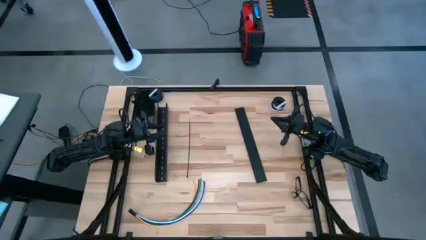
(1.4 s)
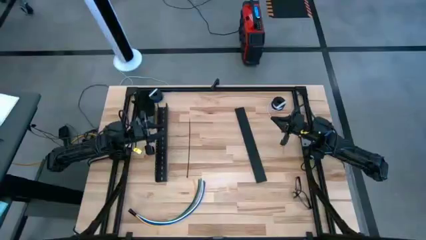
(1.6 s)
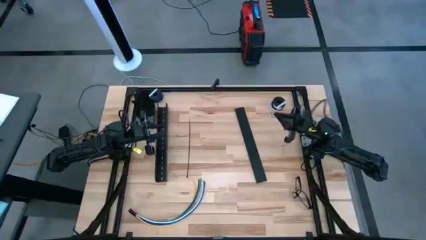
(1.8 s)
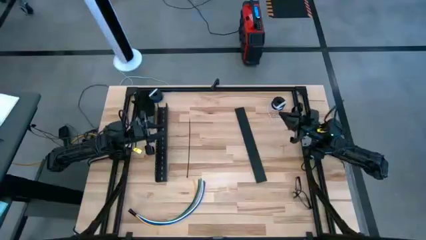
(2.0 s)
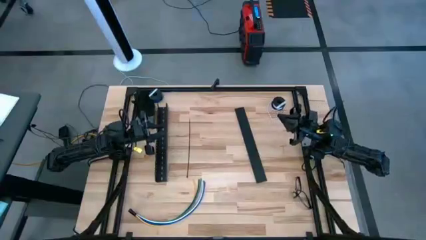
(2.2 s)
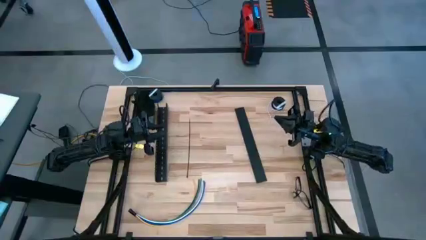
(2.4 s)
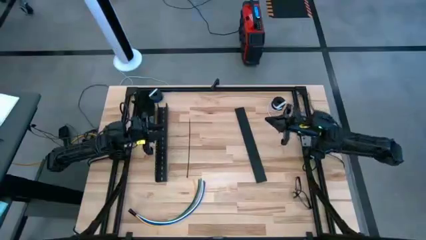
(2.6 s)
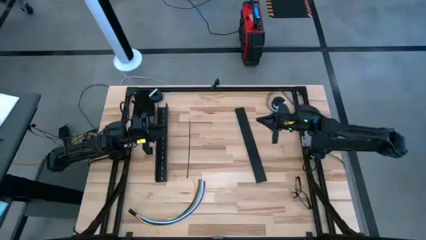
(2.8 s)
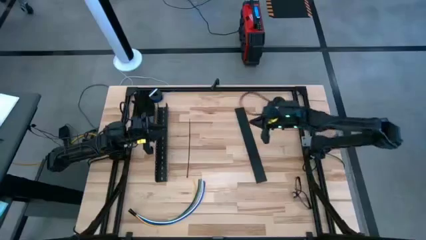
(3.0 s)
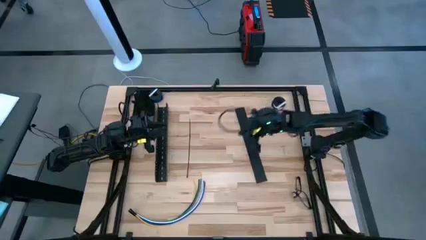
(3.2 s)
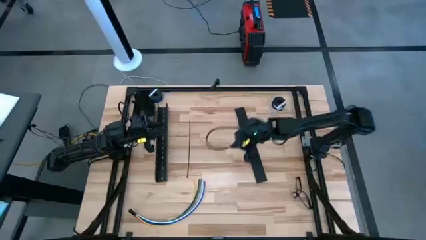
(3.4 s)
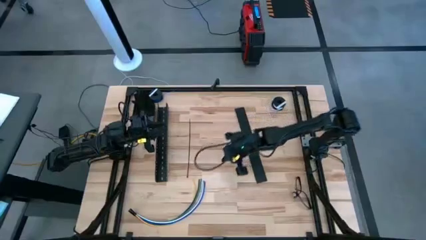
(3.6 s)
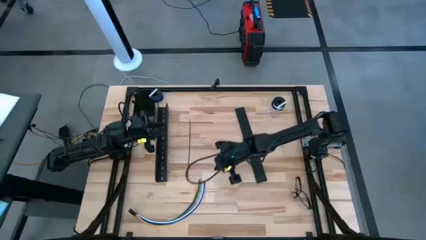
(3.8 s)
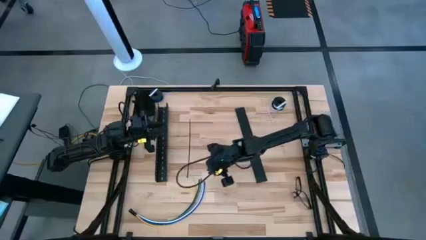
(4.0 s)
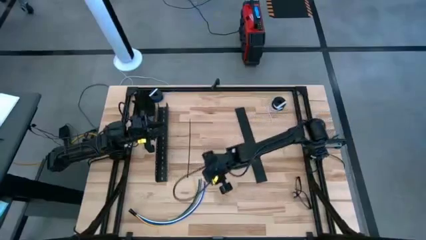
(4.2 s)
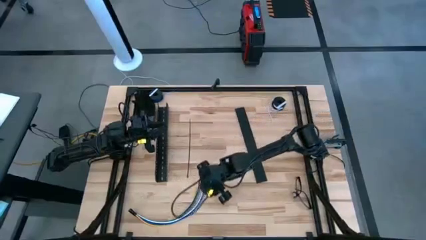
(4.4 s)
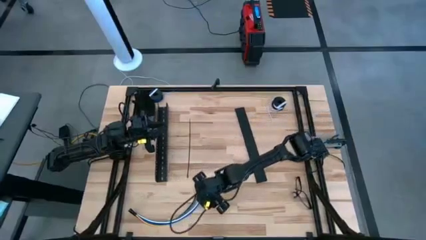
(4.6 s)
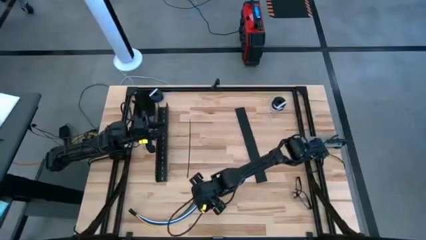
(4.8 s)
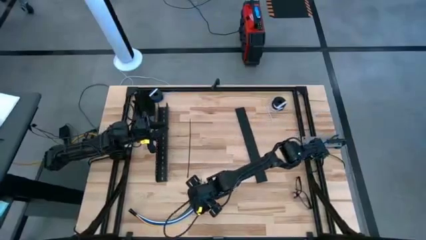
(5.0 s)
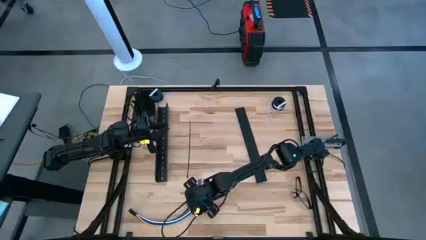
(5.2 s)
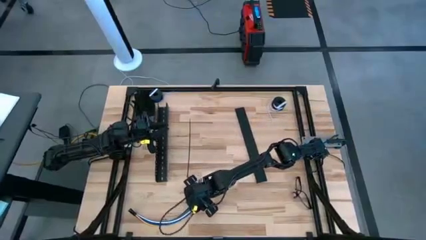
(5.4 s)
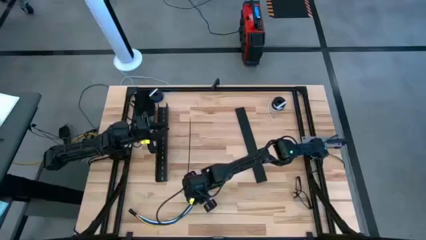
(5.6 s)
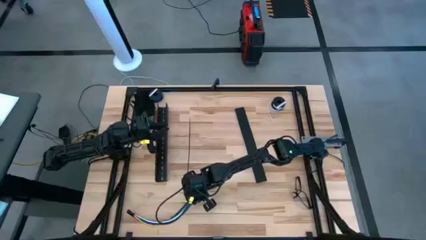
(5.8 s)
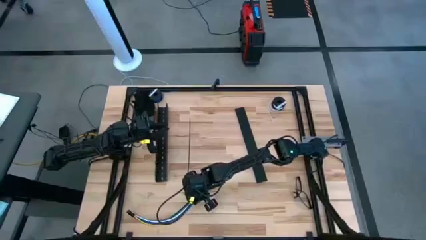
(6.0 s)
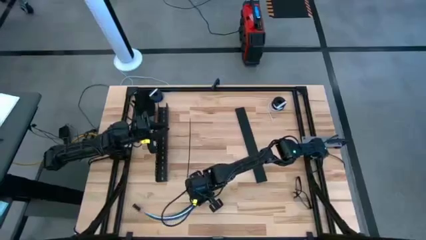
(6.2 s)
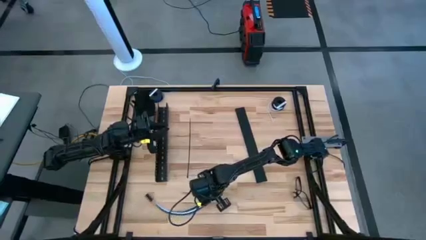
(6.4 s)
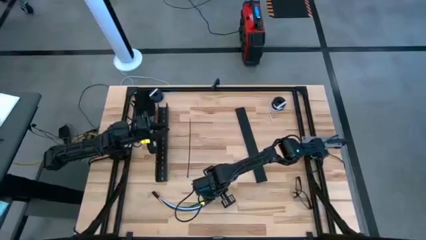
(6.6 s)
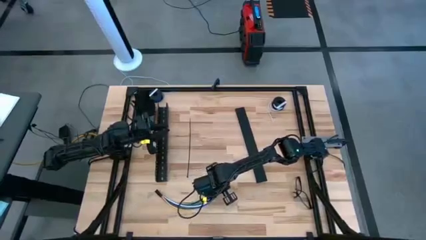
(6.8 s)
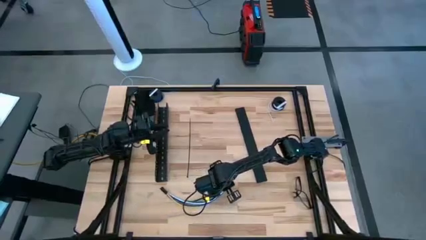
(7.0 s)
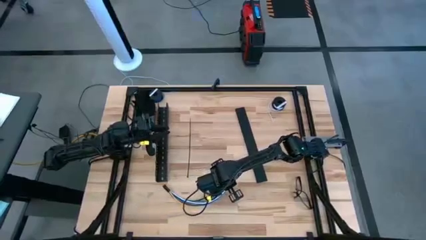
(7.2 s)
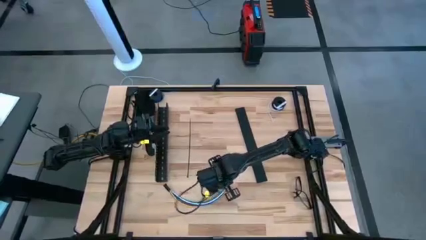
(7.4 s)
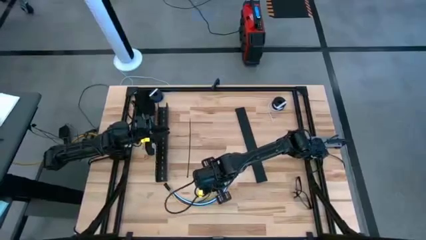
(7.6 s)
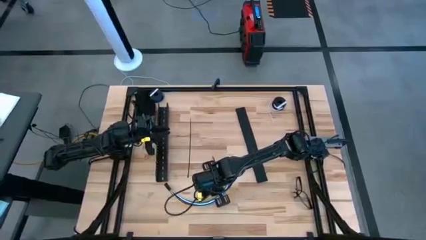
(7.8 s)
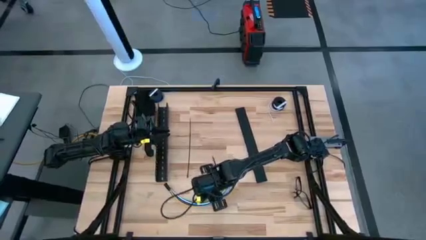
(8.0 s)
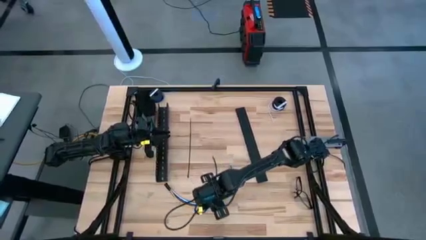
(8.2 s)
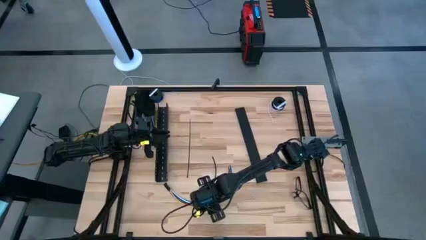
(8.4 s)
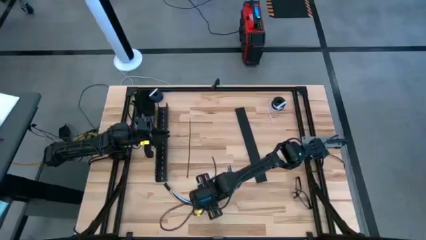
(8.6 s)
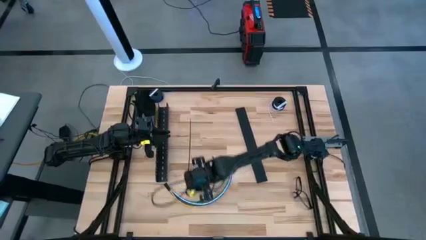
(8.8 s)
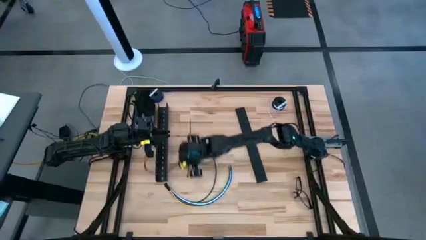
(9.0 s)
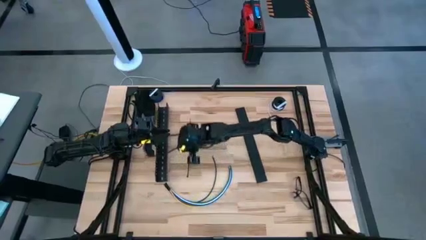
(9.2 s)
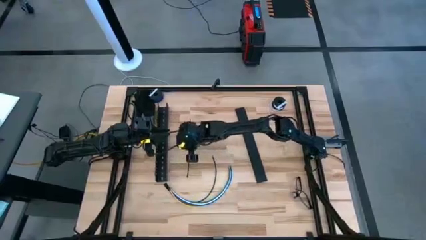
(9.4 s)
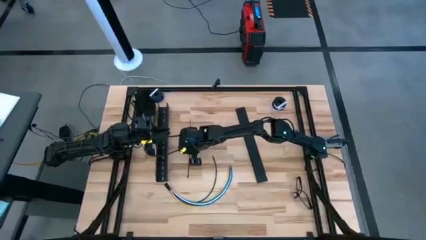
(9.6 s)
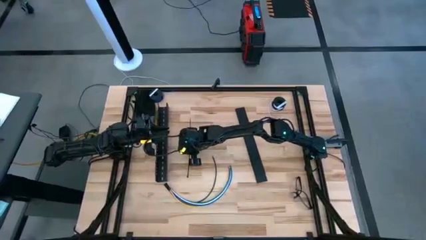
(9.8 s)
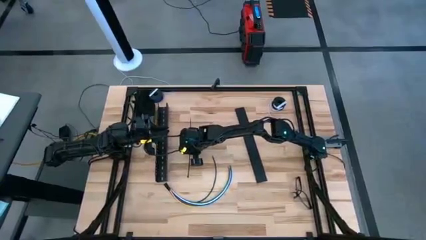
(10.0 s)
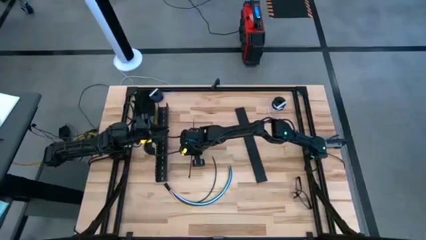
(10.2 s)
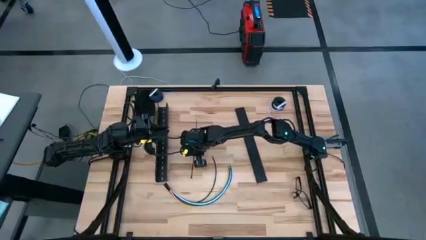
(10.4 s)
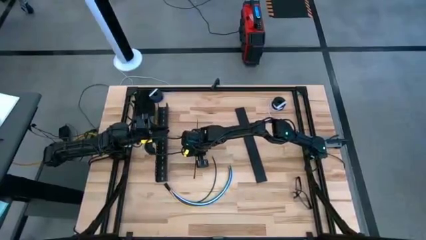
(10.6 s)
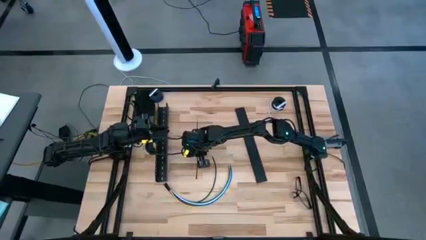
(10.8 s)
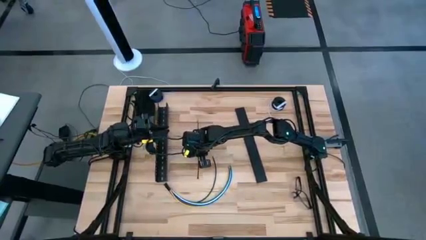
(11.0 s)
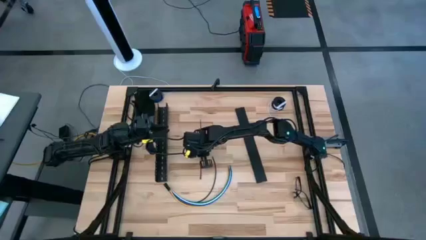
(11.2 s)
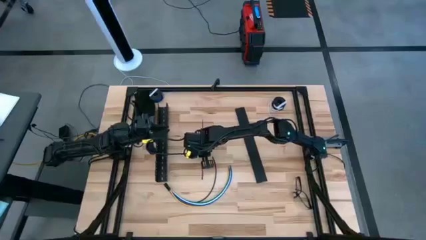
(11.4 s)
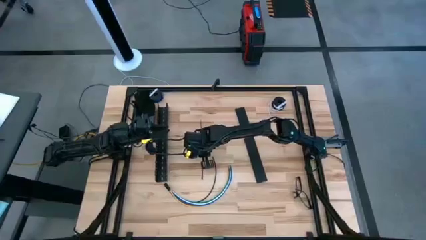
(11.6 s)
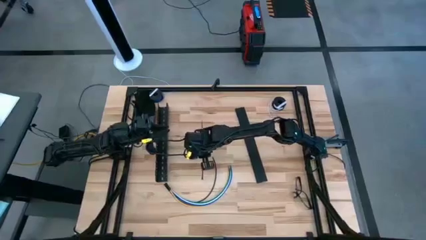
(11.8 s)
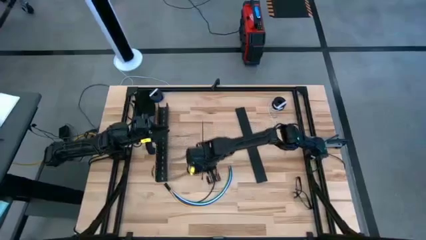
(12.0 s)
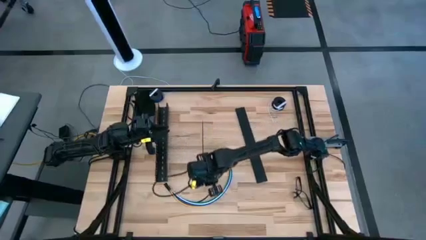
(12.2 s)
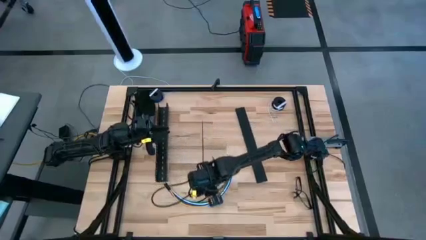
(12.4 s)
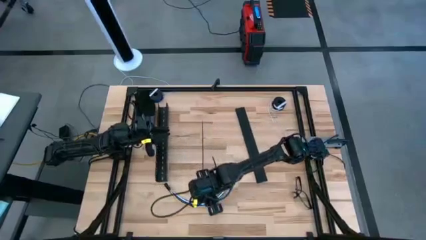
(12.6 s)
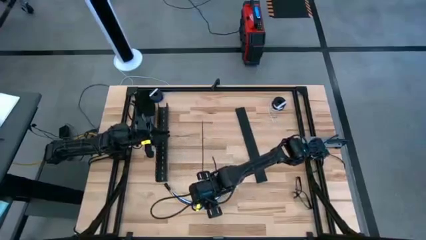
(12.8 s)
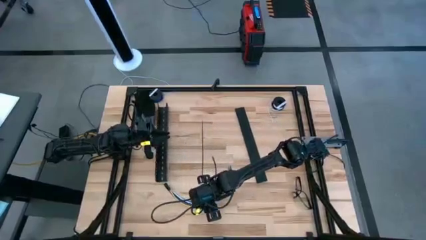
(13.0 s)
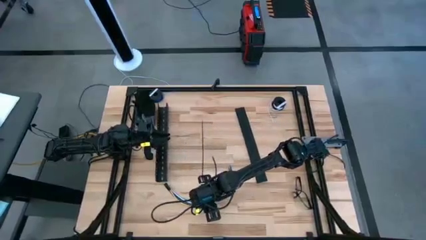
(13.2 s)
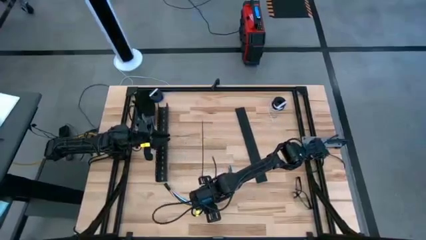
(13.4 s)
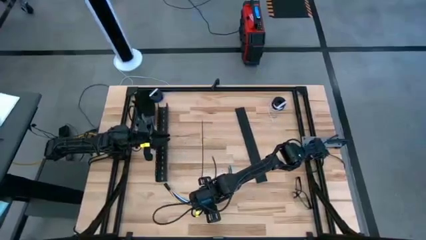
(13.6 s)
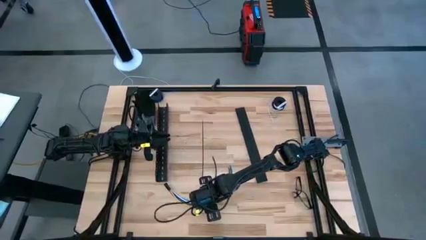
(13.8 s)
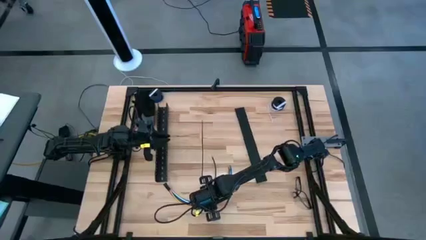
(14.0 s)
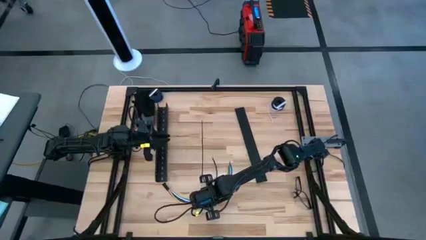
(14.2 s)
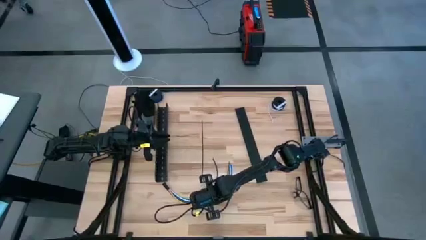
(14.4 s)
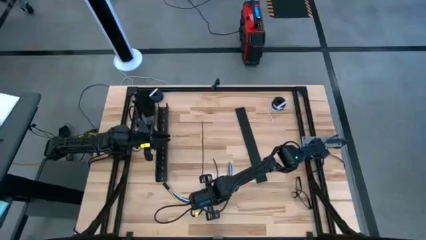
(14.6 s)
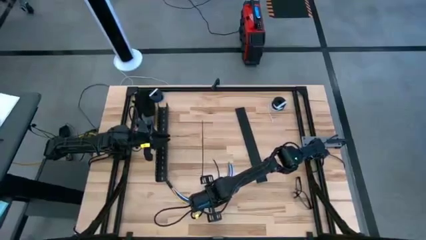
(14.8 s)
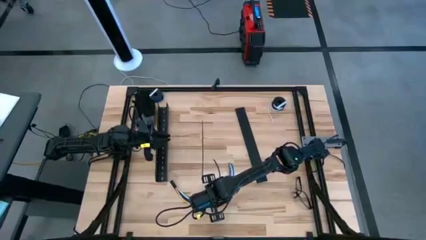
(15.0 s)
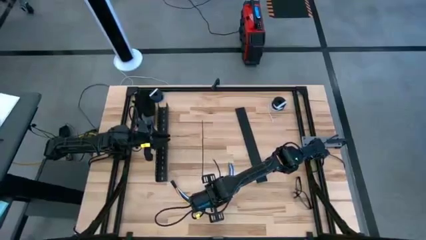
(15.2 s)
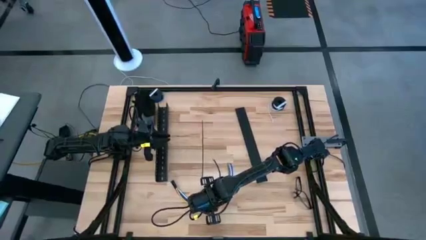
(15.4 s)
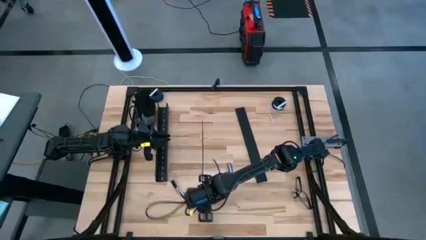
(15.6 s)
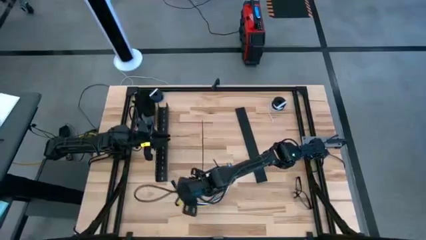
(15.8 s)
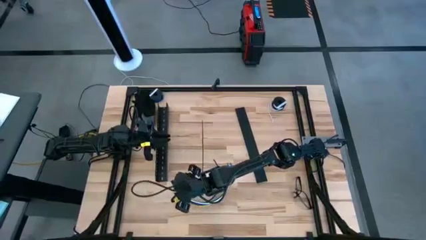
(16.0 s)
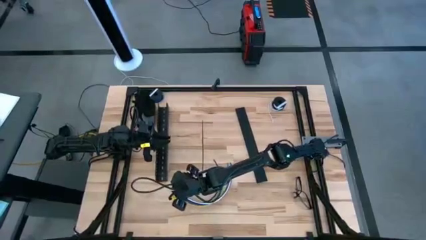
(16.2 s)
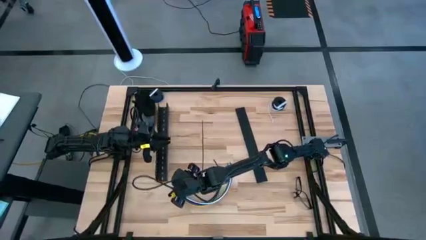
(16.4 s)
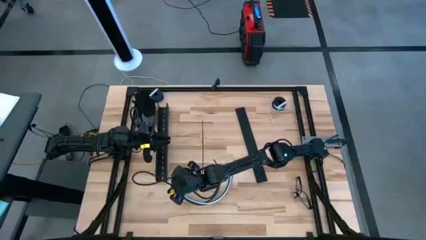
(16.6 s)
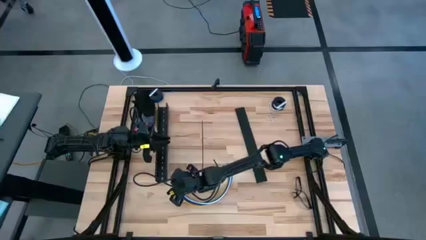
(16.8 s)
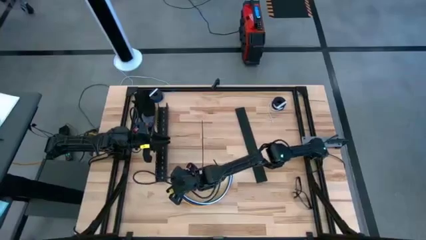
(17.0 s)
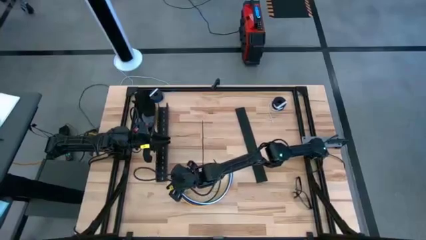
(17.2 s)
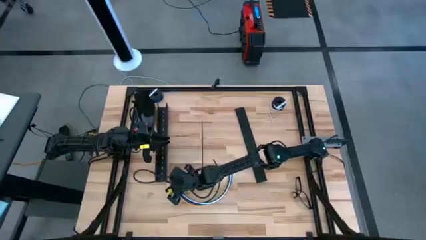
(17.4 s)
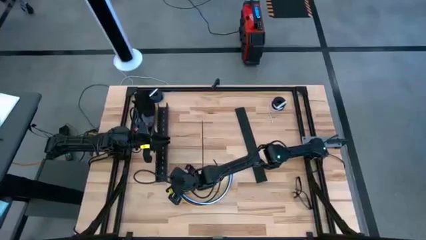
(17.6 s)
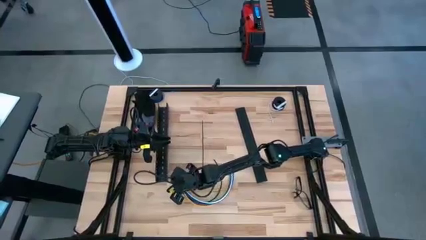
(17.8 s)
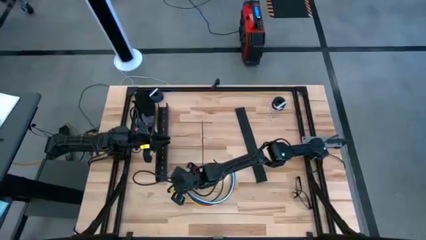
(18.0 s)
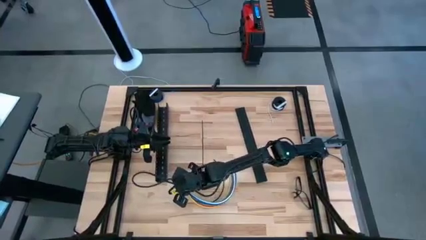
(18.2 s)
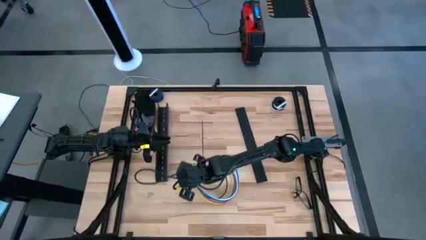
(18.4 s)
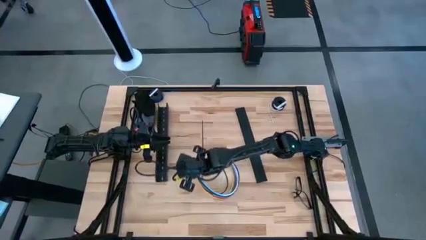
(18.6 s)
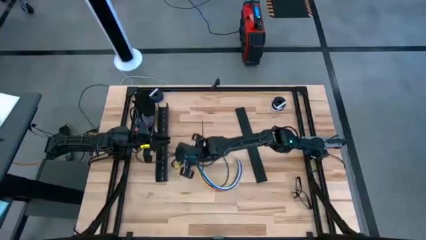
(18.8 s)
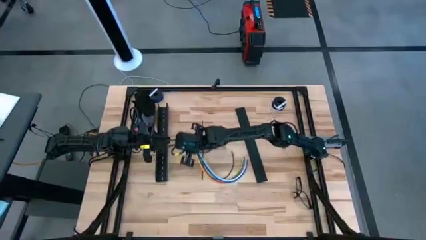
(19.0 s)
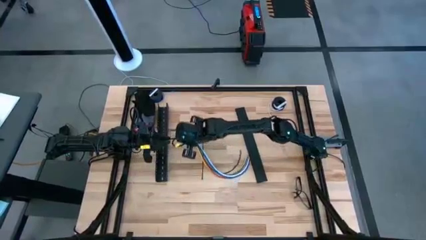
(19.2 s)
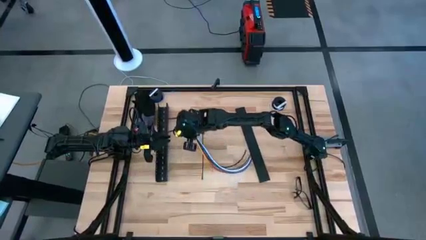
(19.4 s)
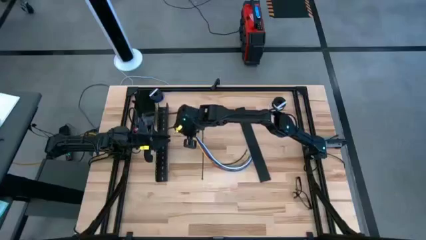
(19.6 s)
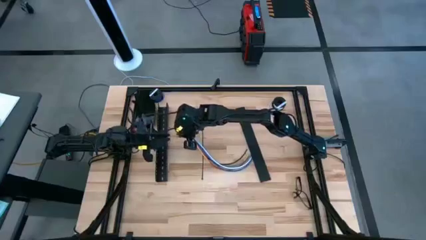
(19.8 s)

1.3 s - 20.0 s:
Task: Ziptie cables
Wrap the black zip tie on the cable
